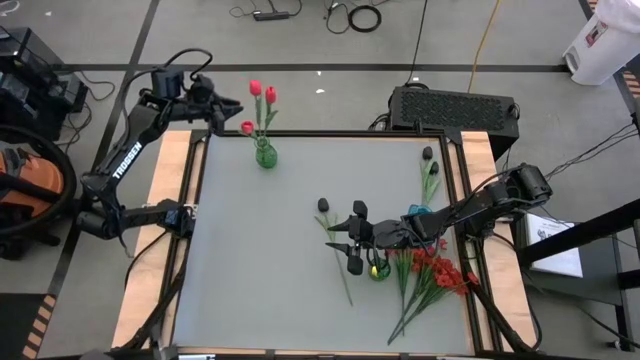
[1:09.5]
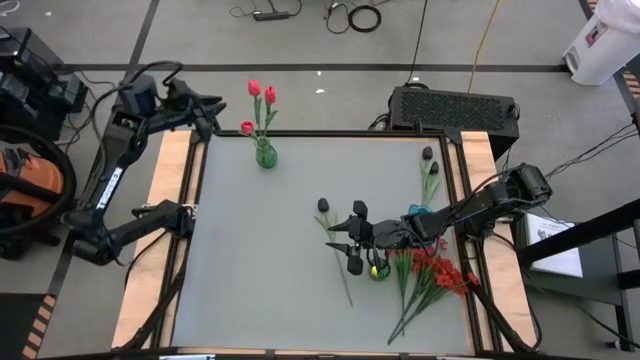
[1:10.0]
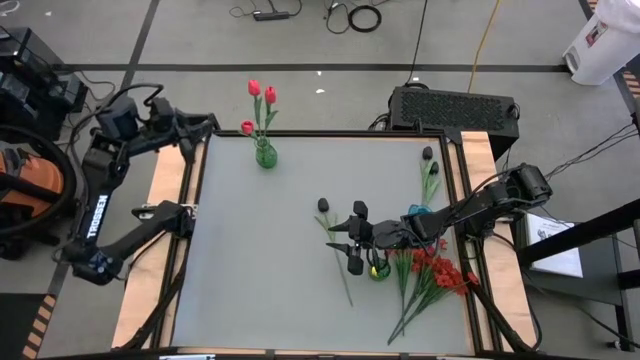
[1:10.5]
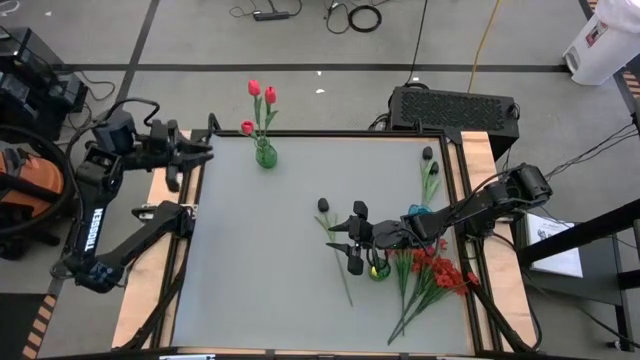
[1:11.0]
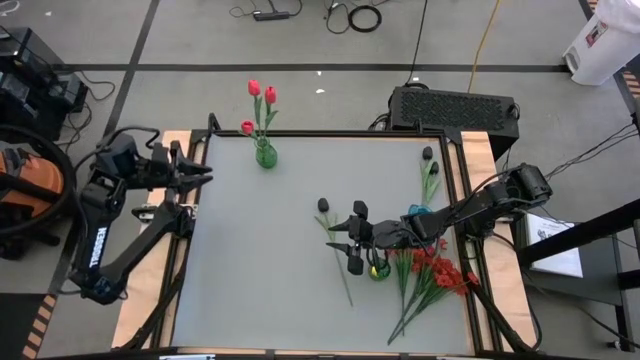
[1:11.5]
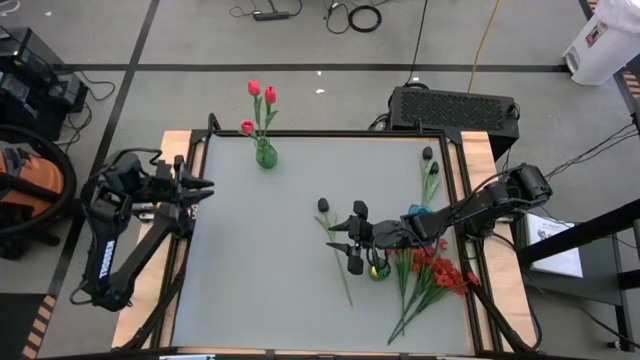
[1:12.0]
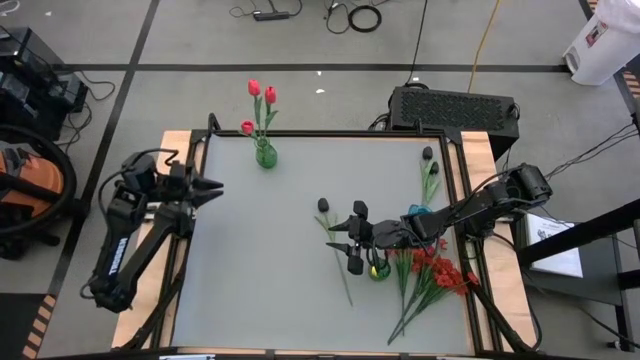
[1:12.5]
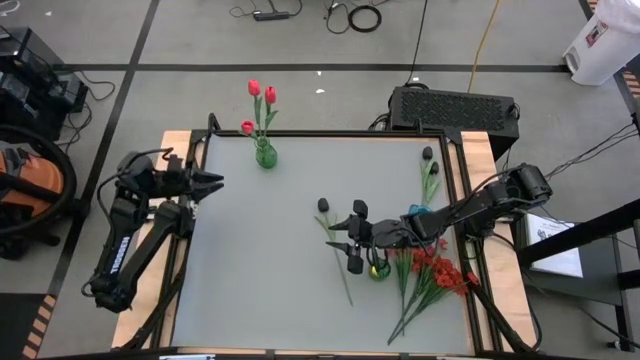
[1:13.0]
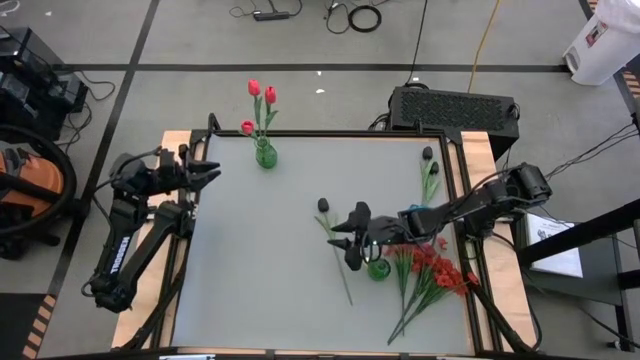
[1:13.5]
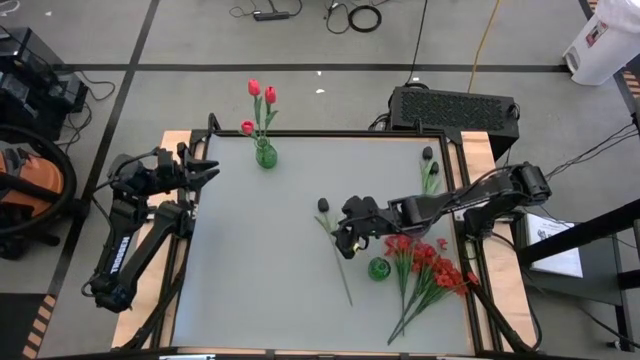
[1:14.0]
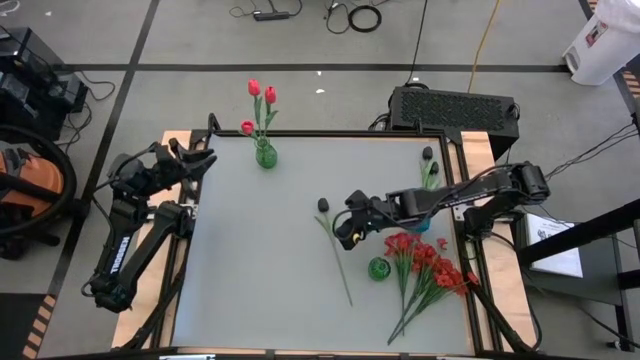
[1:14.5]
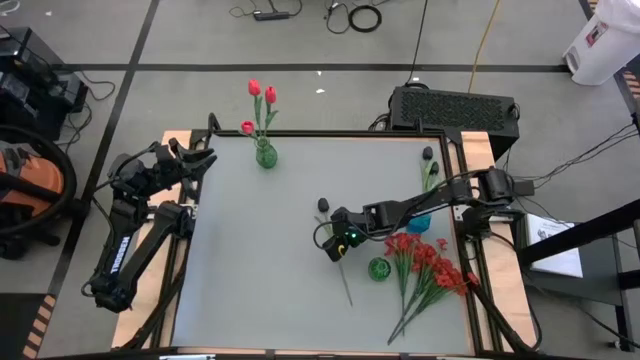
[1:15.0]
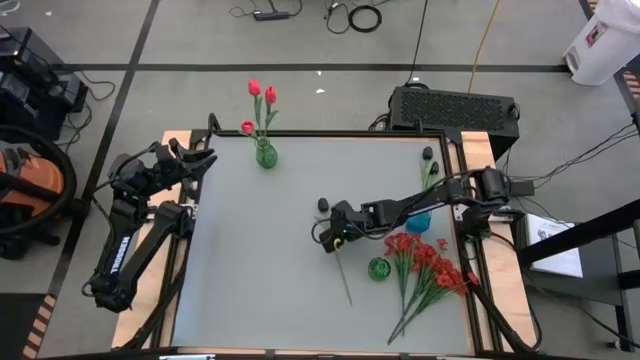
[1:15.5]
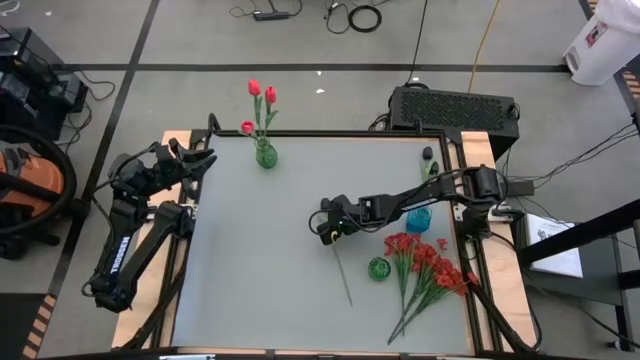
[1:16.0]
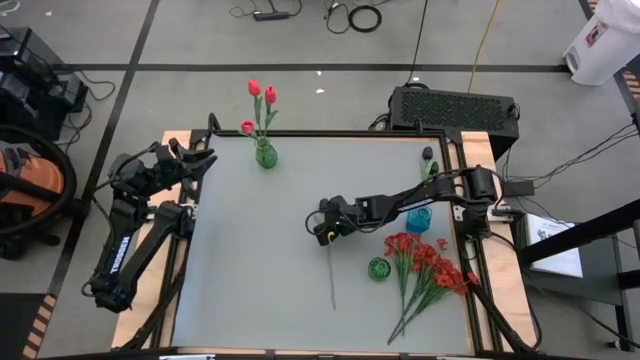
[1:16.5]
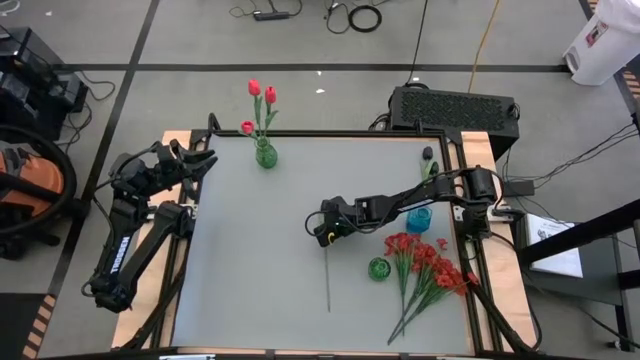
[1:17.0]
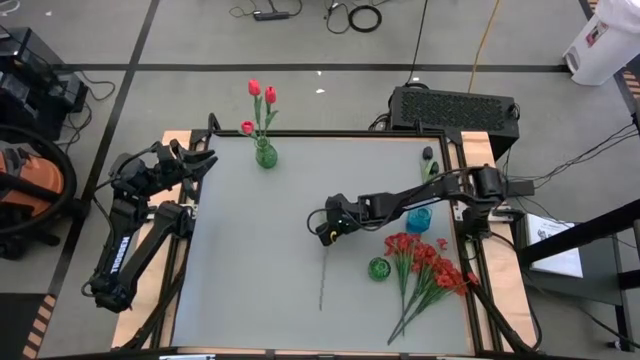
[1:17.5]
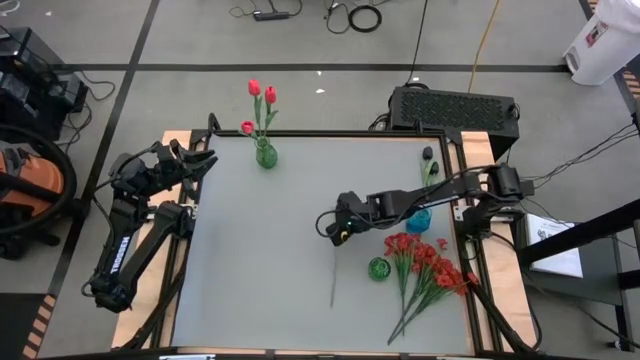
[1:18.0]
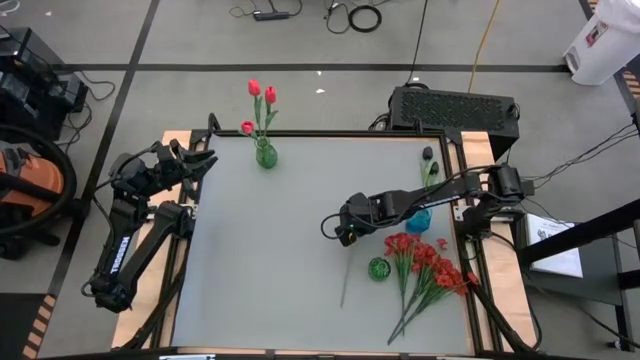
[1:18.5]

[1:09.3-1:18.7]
Task: Sort flowers into vase by color
Put the bottom left black flower into the blue vase

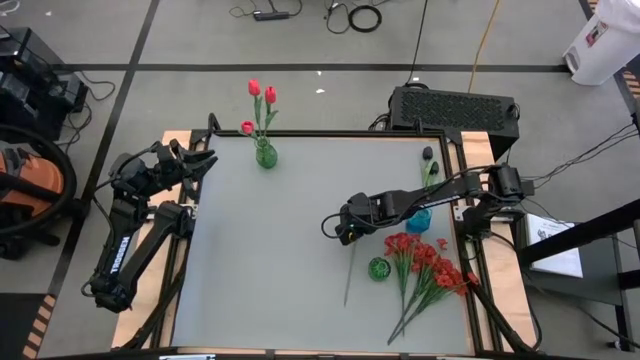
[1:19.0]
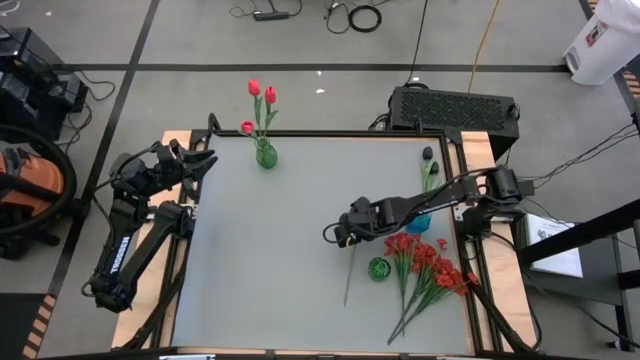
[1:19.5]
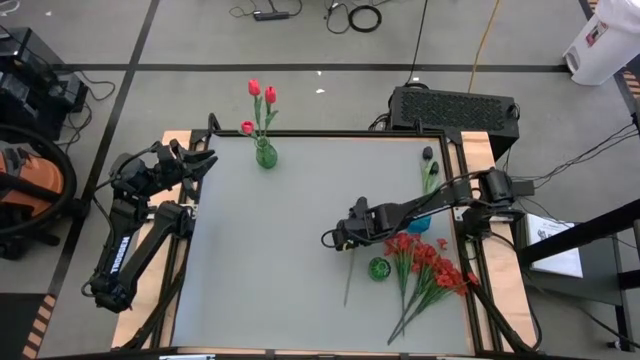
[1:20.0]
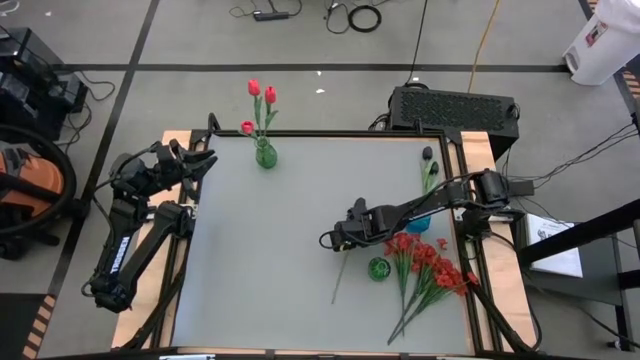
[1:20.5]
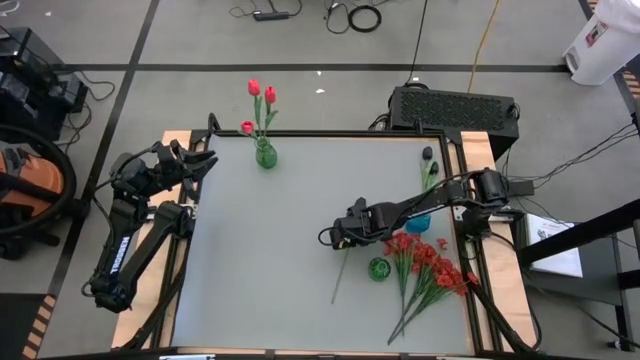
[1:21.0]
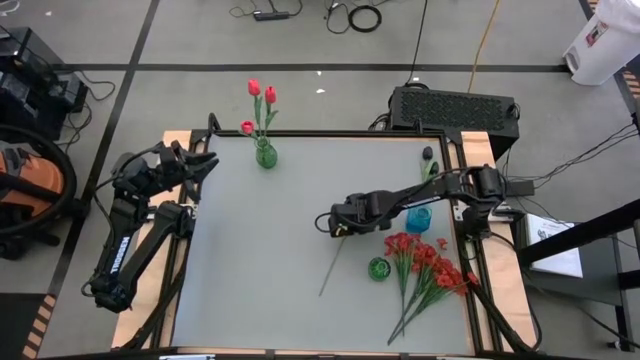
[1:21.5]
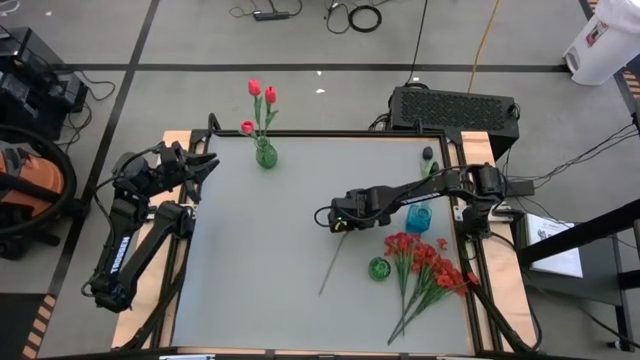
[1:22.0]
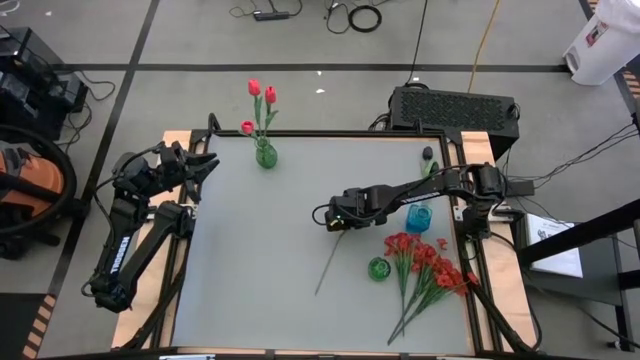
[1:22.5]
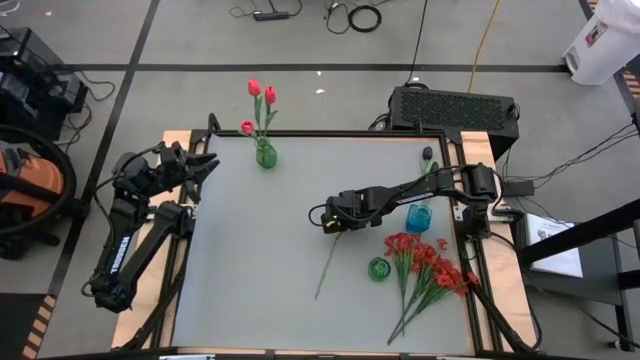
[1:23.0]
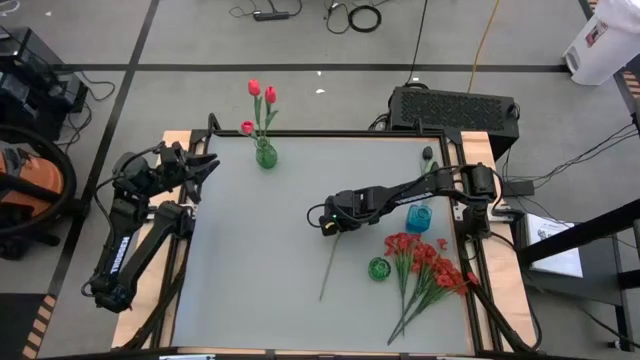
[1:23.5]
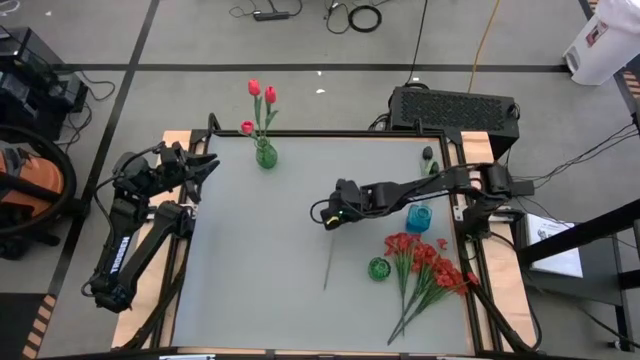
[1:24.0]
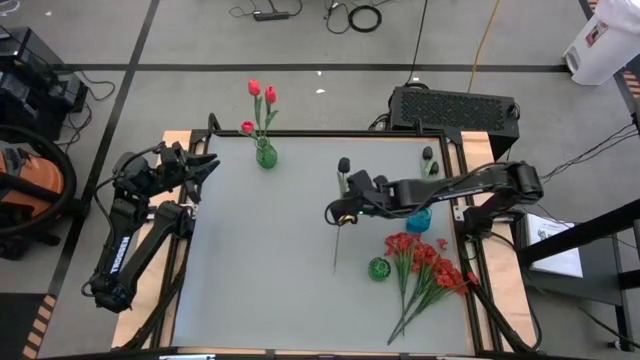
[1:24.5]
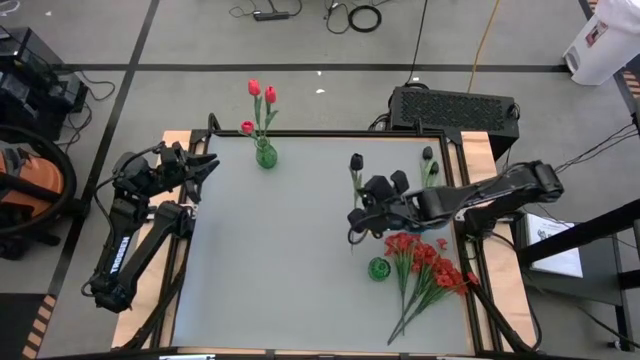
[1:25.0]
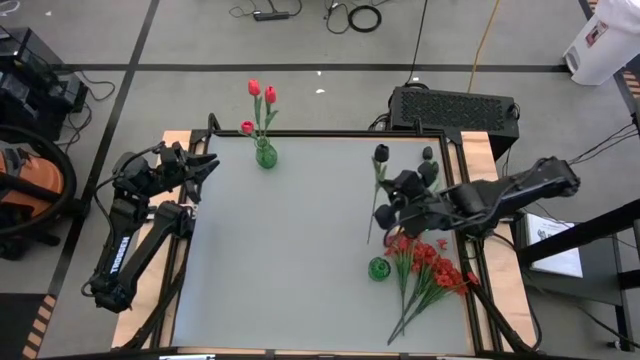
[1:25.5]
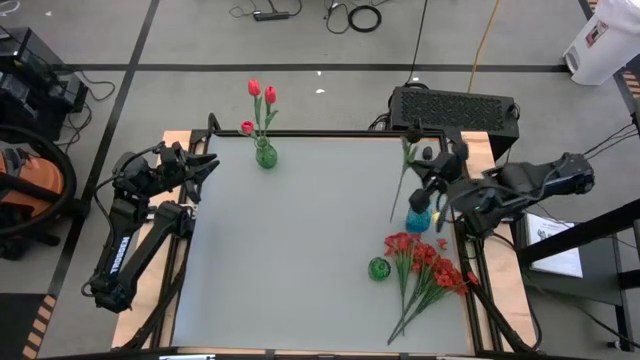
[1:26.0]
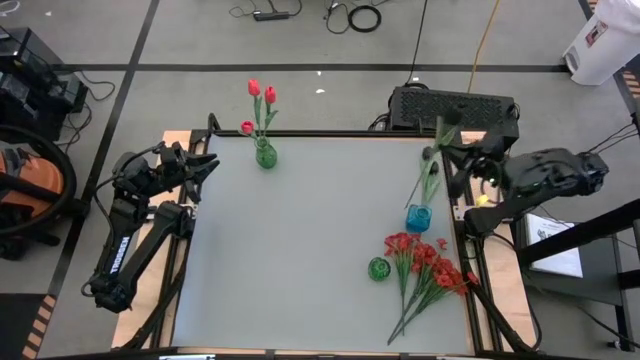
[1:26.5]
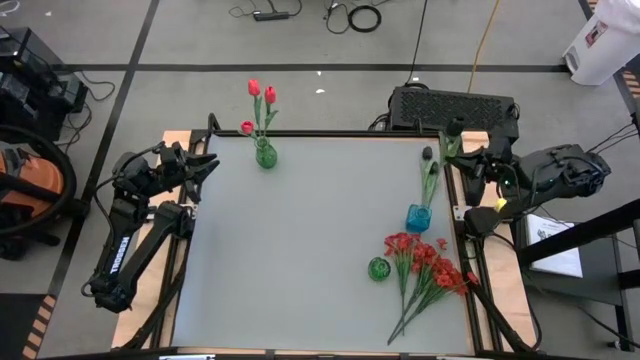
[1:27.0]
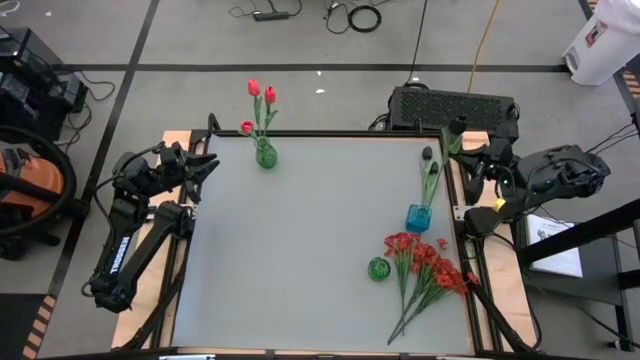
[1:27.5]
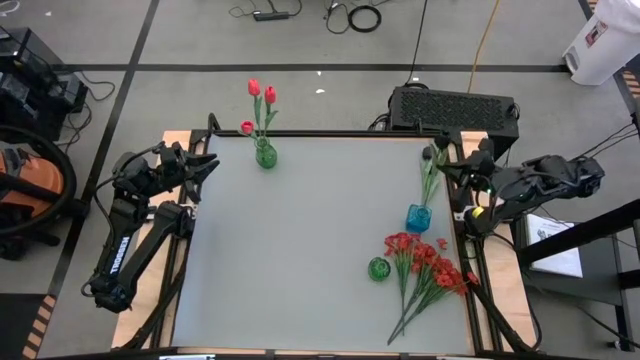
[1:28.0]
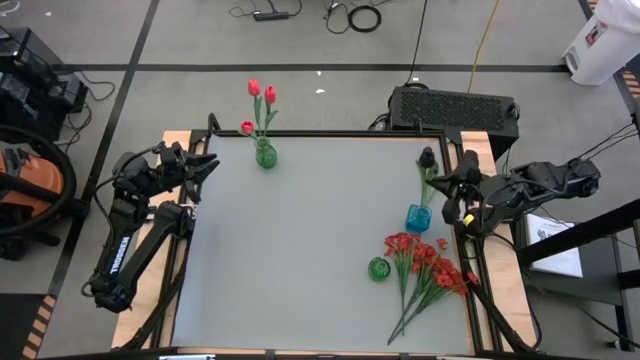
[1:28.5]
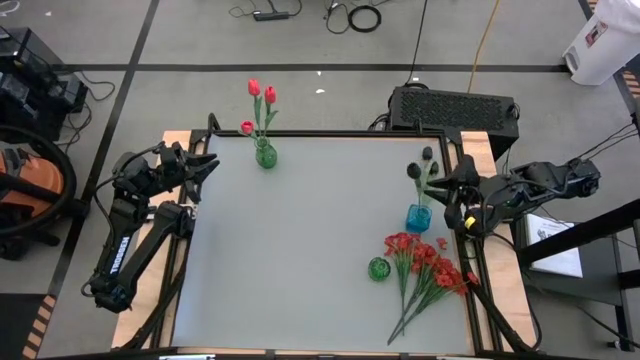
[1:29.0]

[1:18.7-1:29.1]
Put the bottom left black flower into the blue vase

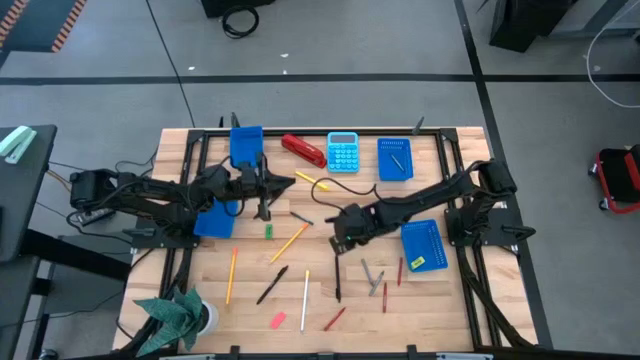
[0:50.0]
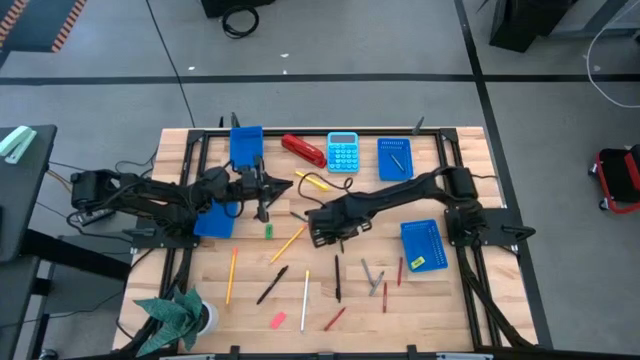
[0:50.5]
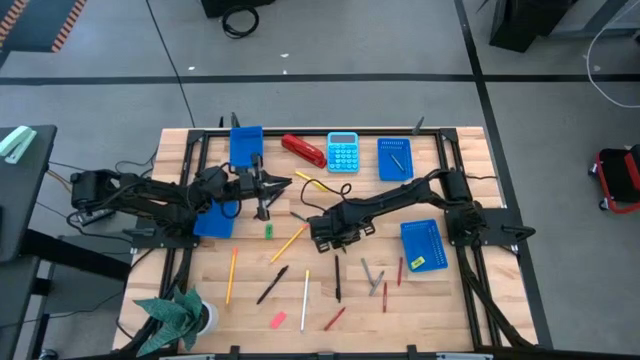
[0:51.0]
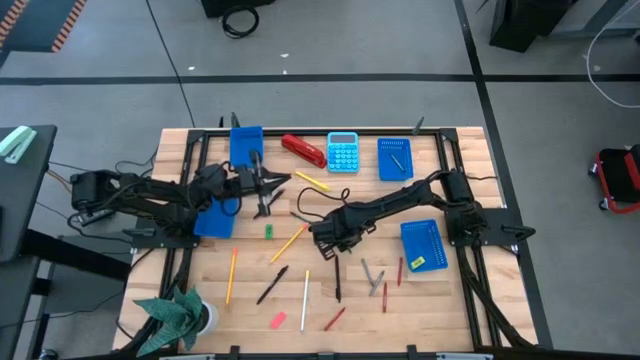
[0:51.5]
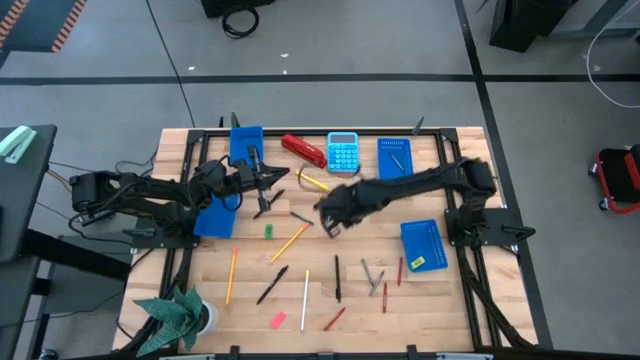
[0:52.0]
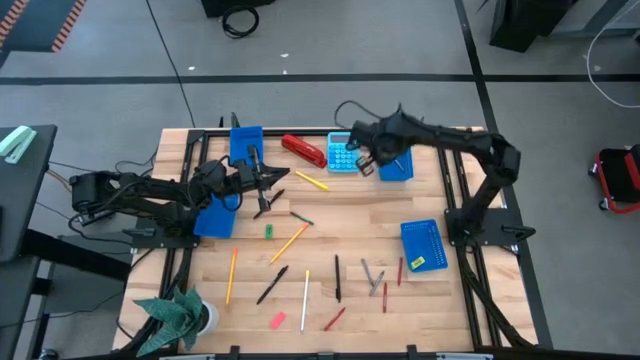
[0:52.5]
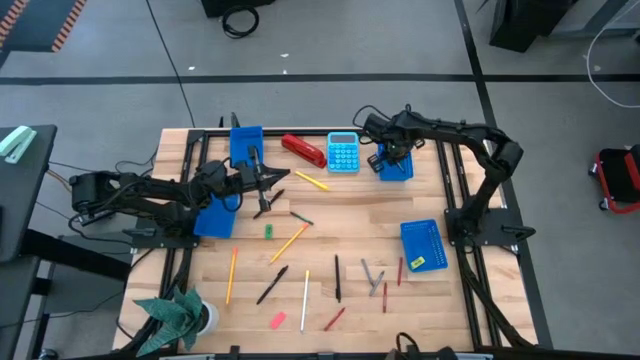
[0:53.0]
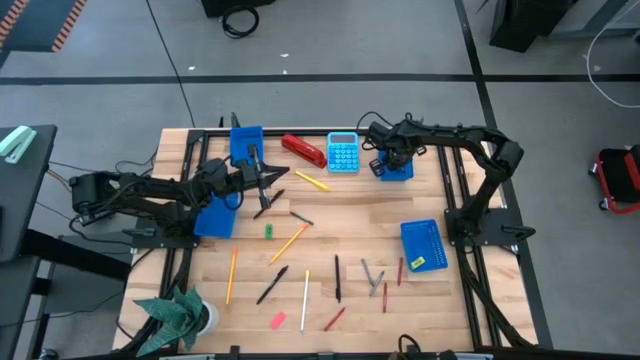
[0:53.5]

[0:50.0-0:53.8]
Task: Sort crayons/erasers/pens/pencils in bins
Put the green crayon into the top right bin
